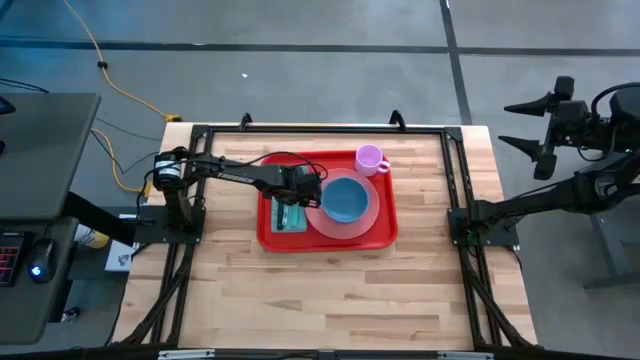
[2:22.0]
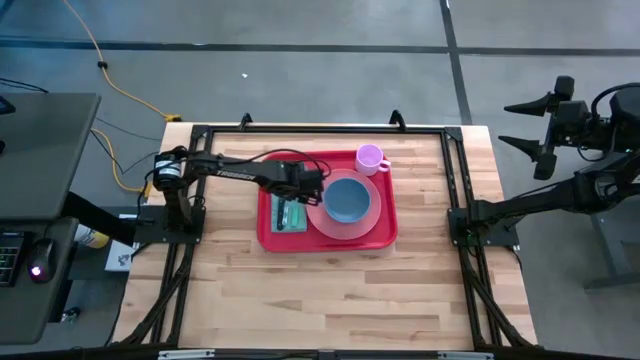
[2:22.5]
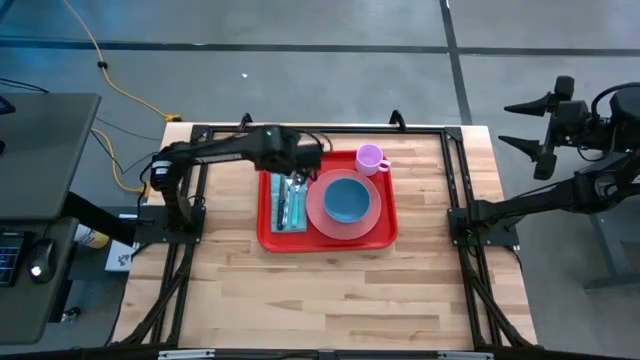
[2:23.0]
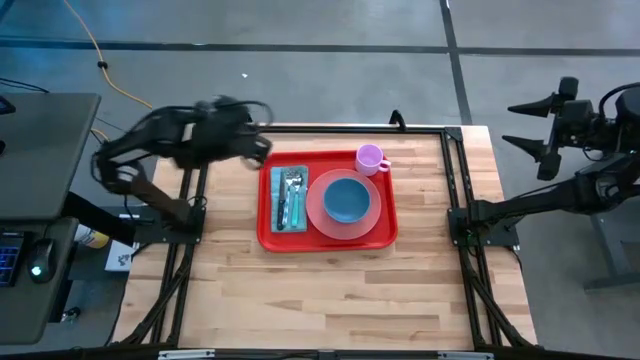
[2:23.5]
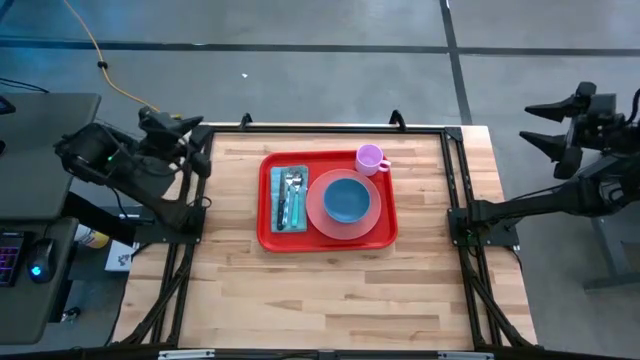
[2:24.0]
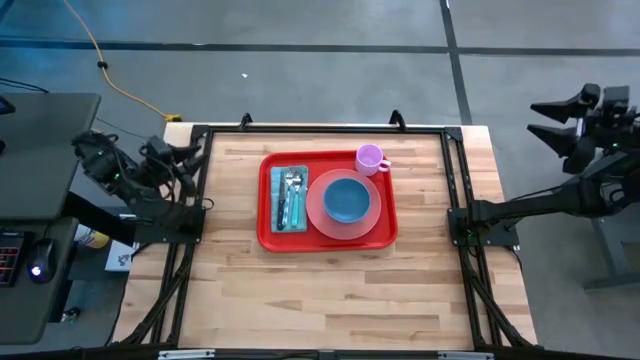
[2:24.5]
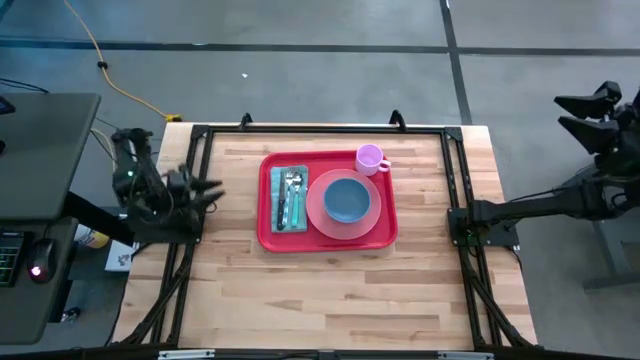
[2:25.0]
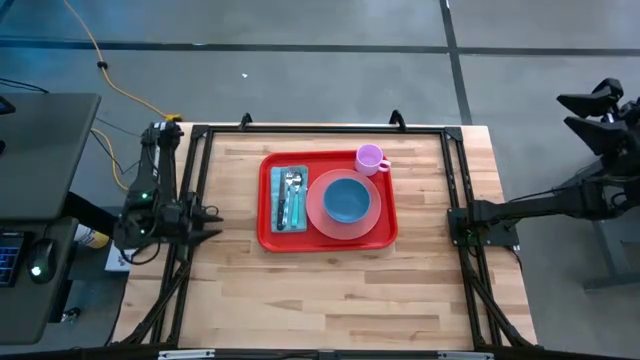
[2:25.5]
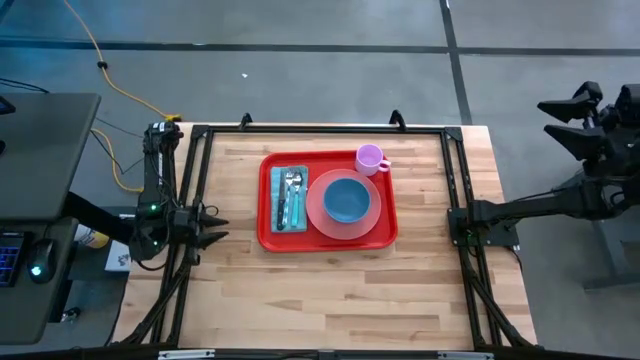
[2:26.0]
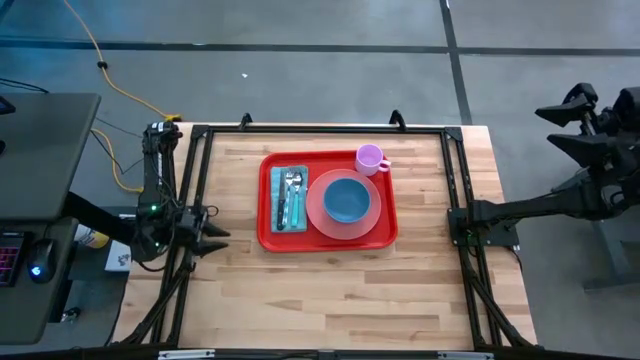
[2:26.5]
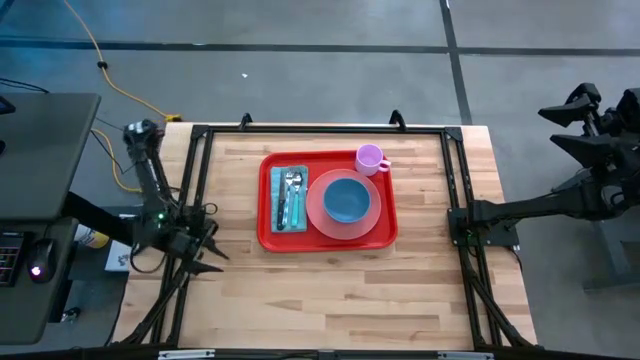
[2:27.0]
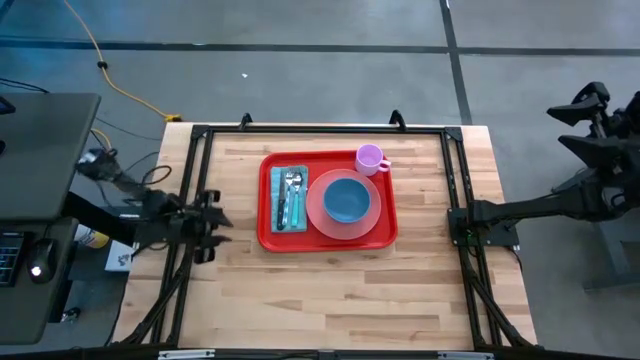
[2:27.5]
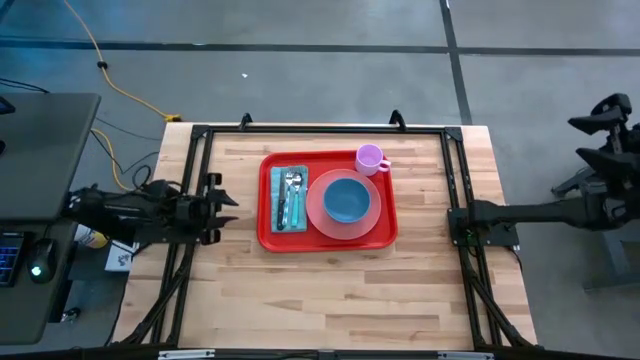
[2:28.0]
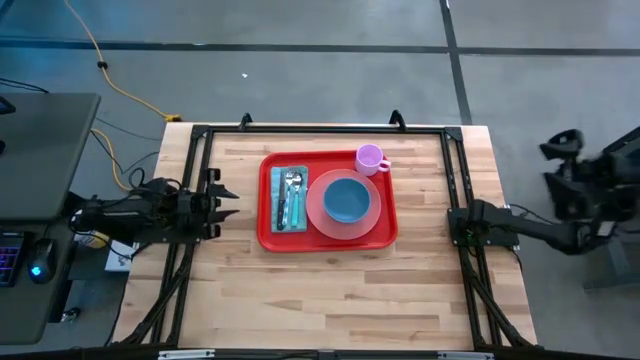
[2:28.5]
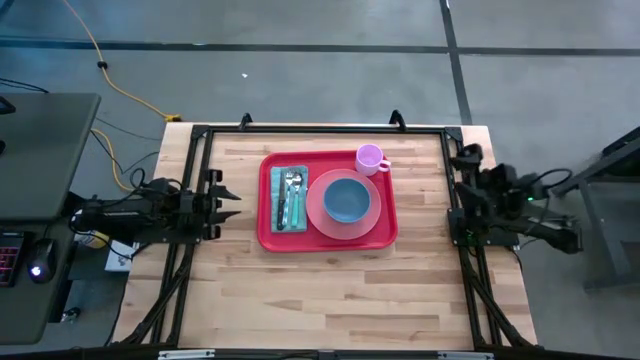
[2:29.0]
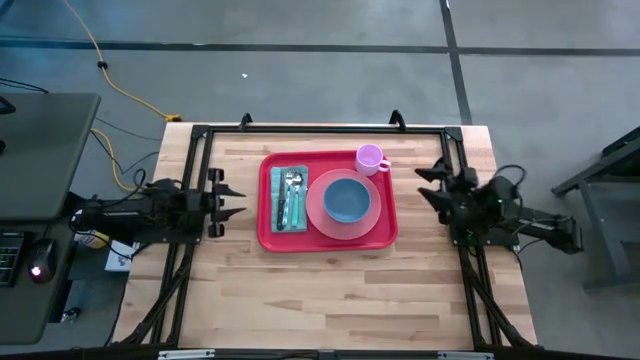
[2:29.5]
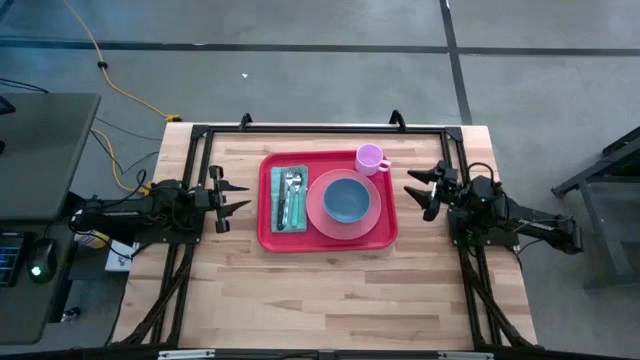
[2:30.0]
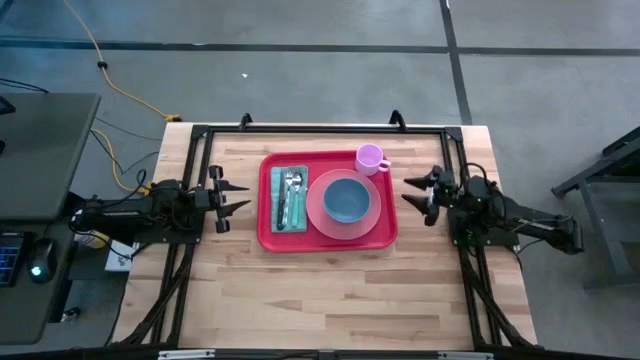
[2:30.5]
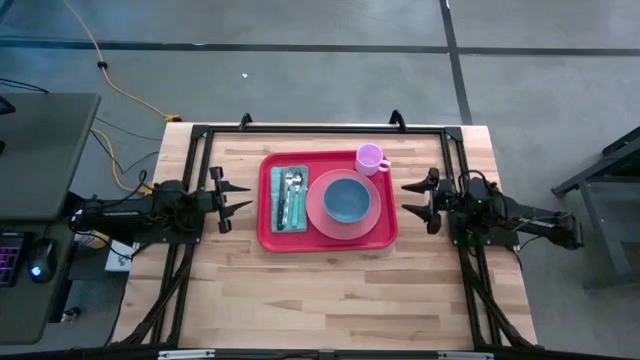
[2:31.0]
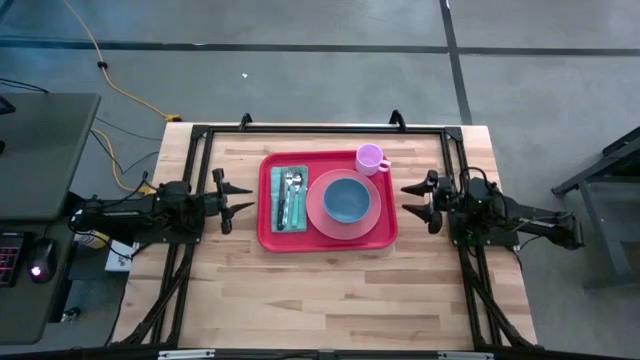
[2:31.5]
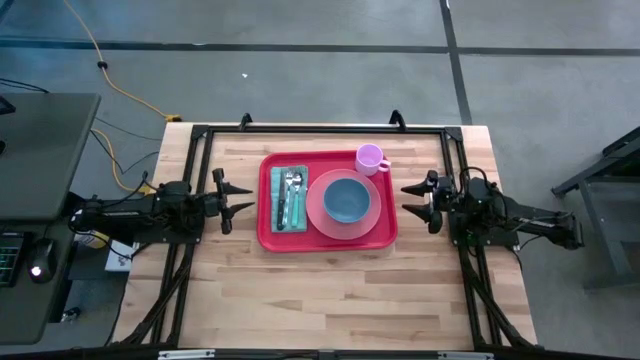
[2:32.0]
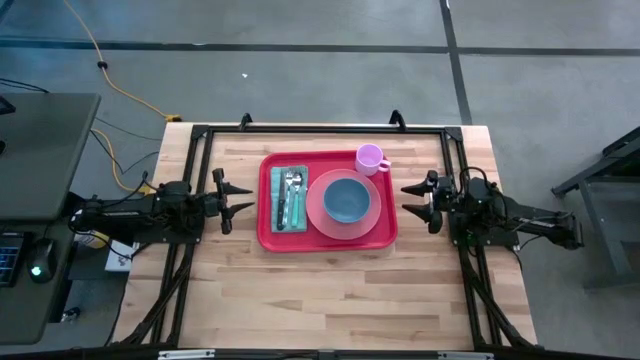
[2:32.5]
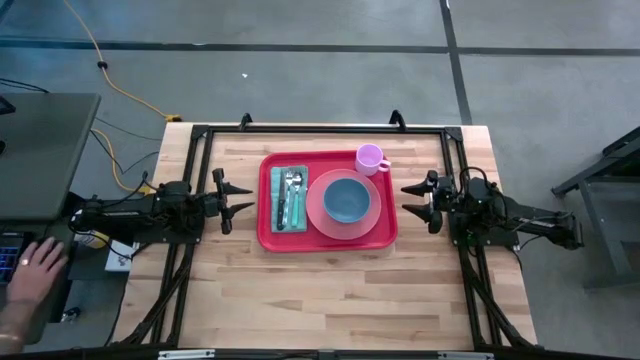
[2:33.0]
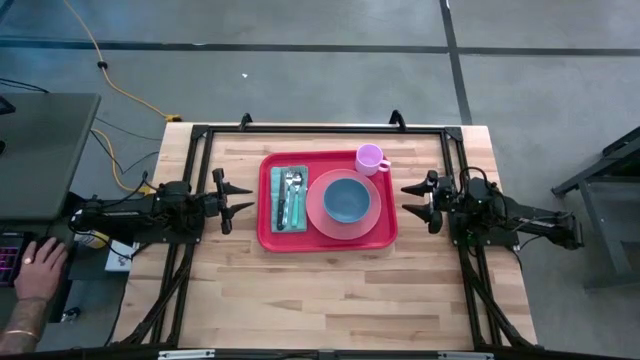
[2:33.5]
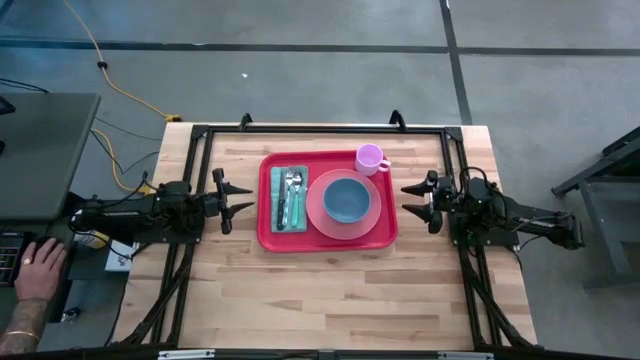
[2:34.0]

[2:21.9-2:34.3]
Task: Set up tray
Return To Home Position

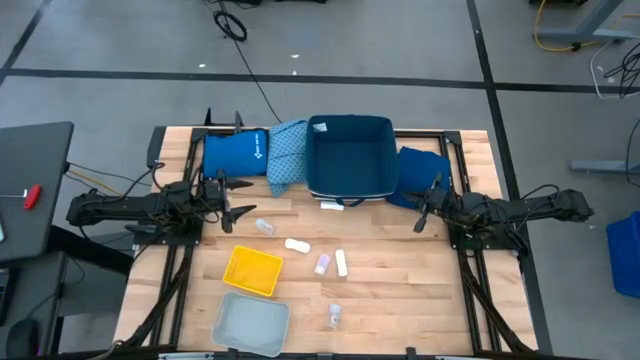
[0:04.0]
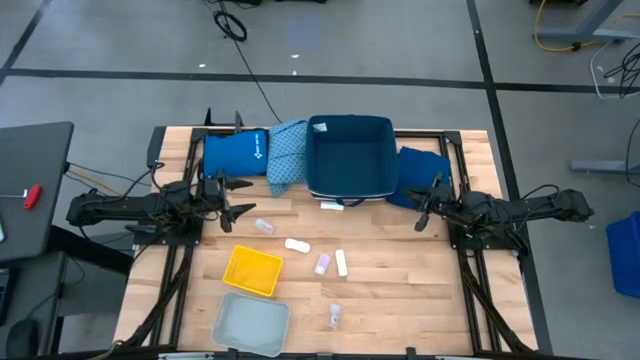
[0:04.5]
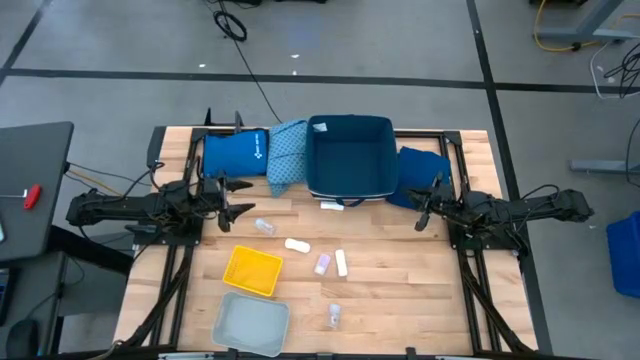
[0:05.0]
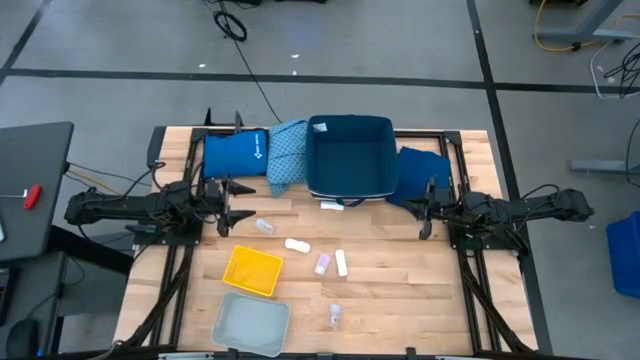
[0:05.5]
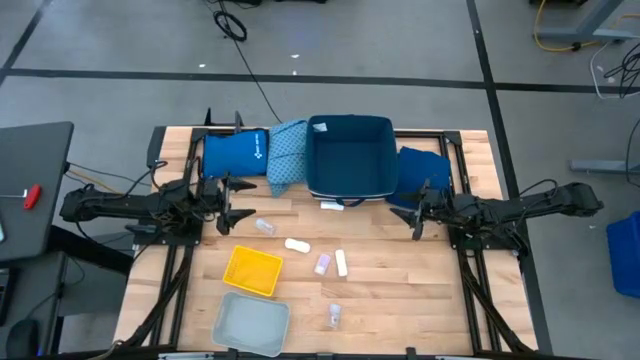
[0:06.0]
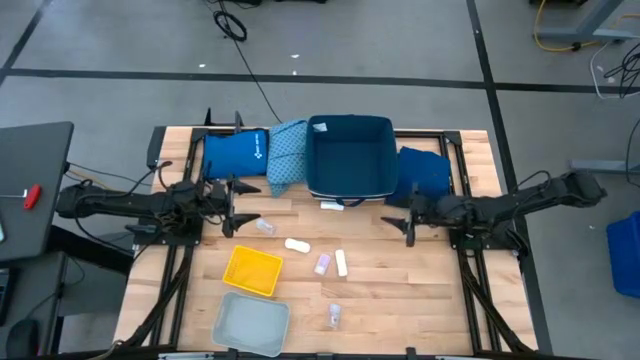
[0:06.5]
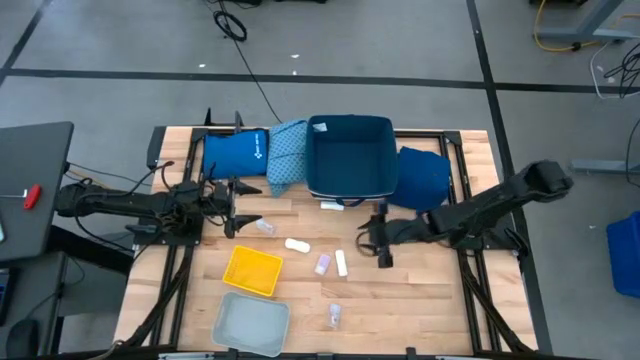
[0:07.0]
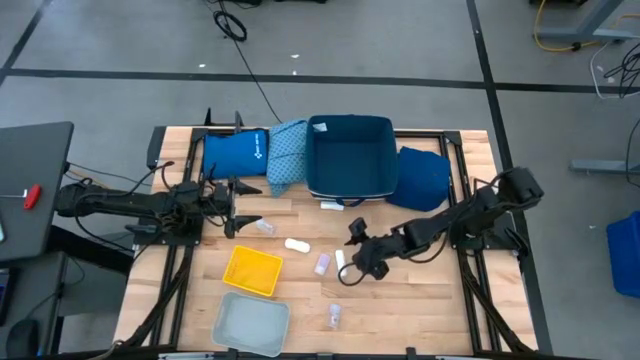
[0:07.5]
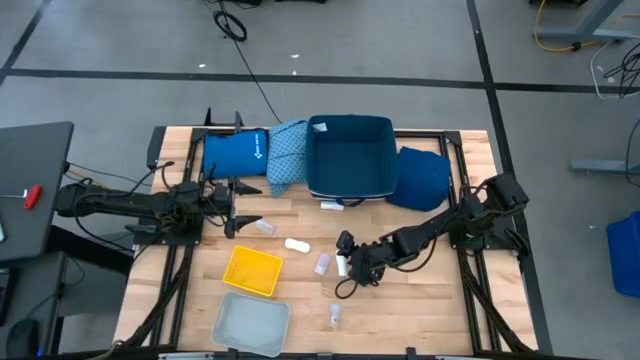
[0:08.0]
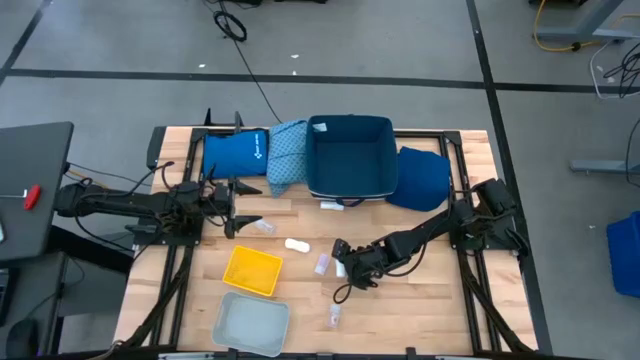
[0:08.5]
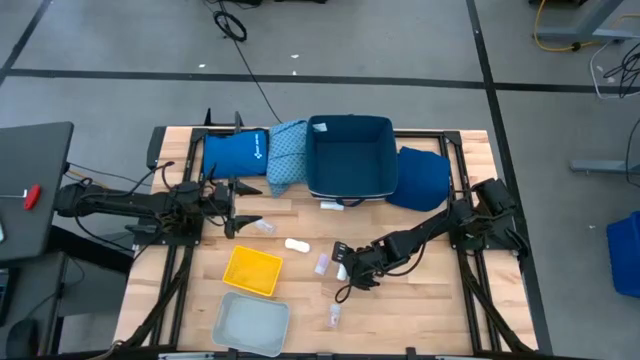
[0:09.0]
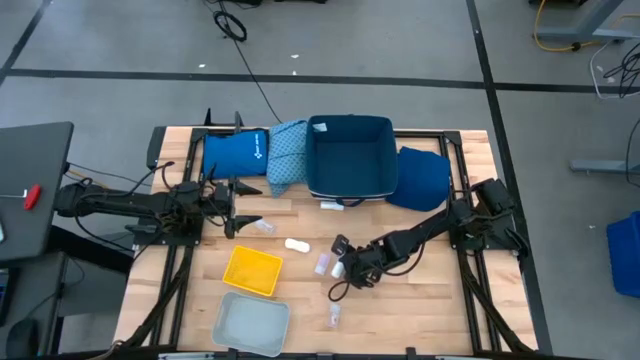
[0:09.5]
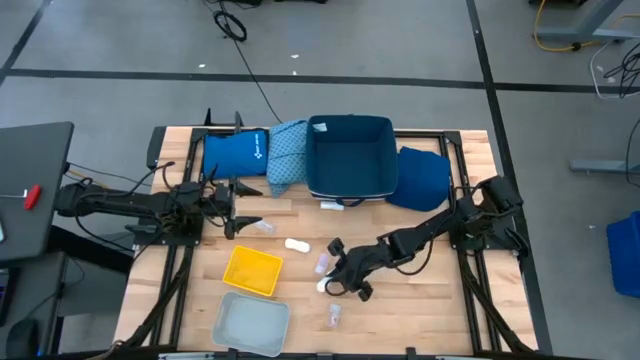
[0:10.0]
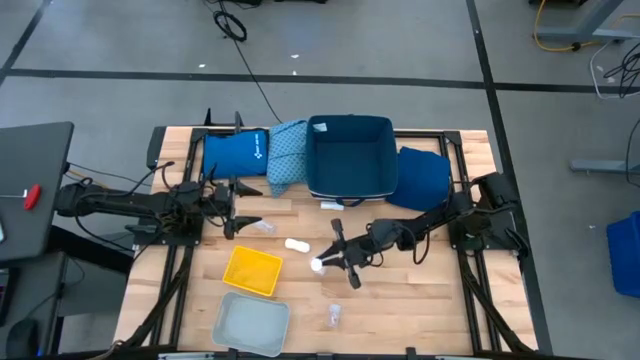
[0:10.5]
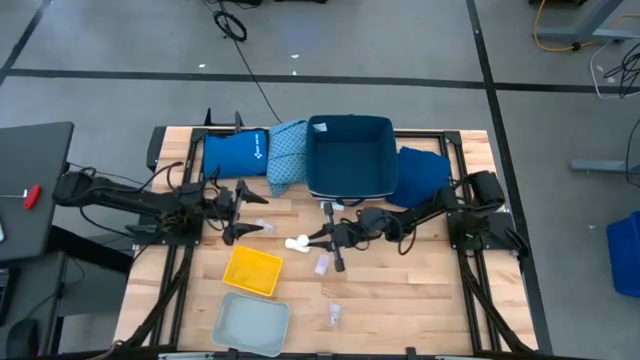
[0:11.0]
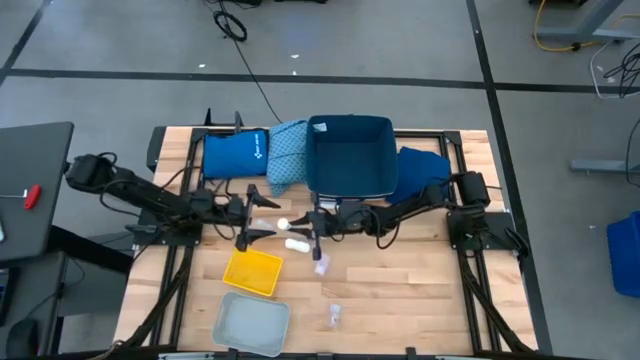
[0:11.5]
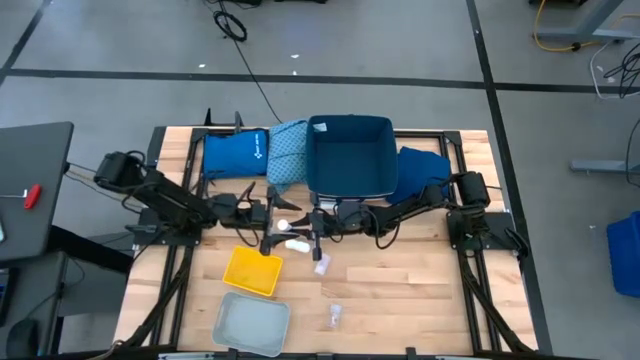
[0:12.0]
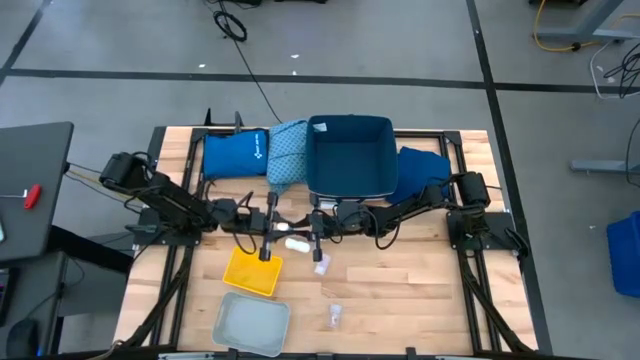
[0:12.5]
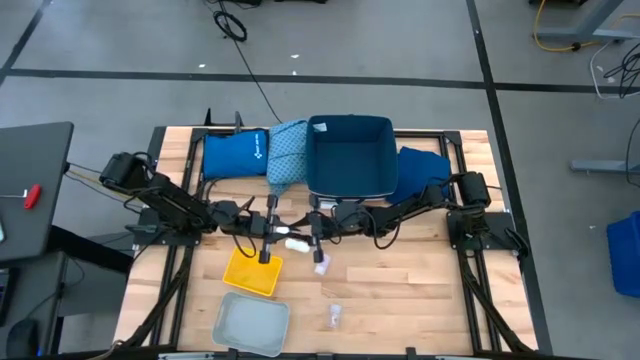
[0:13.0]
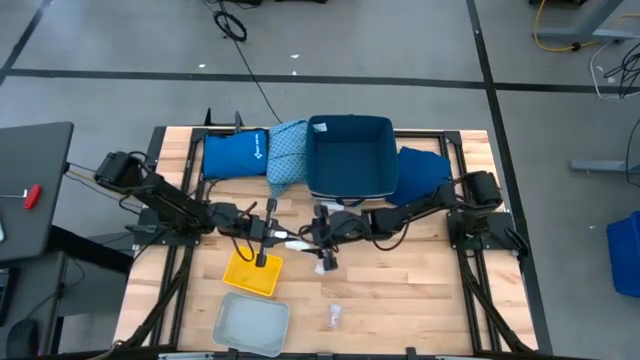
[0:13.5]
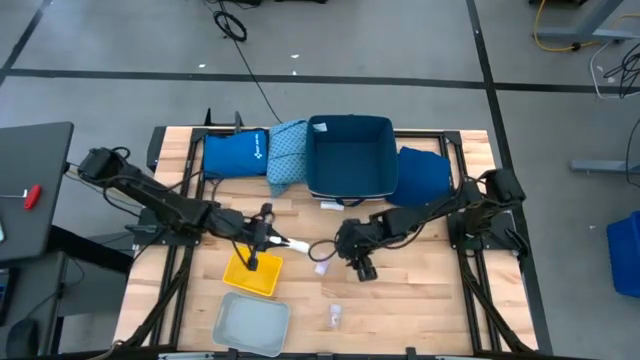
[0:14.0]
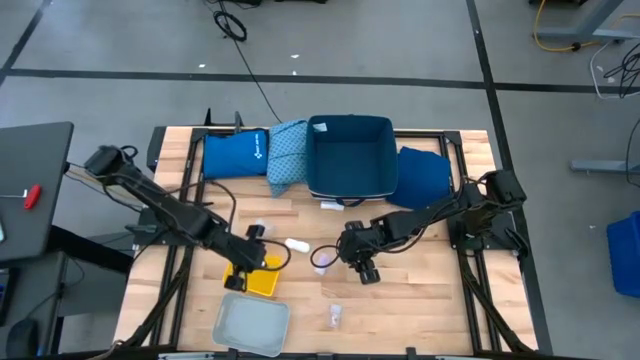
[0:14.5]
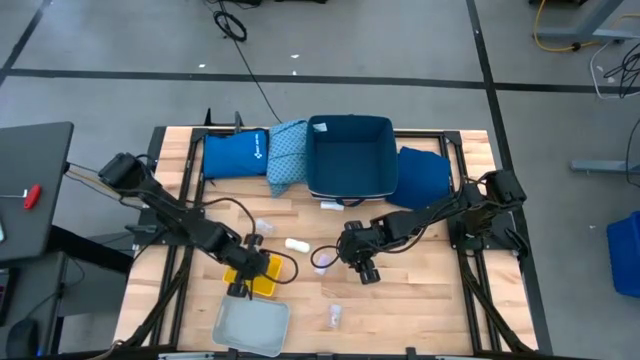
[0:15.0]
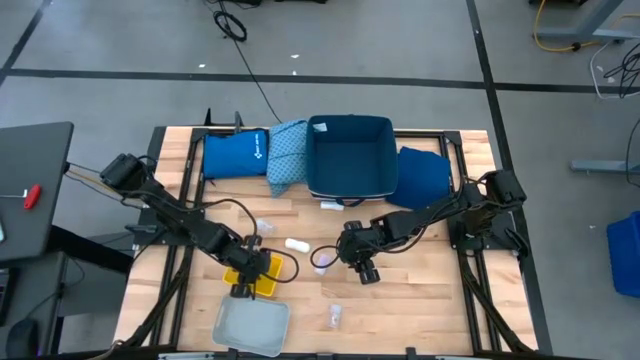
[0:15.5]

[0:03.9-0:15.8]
Task: Pick & place medical supplies in basket/bin
Put the bottom white rolled gauze into the yellow bin
